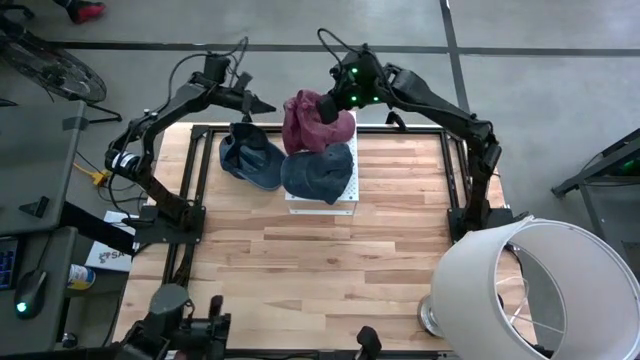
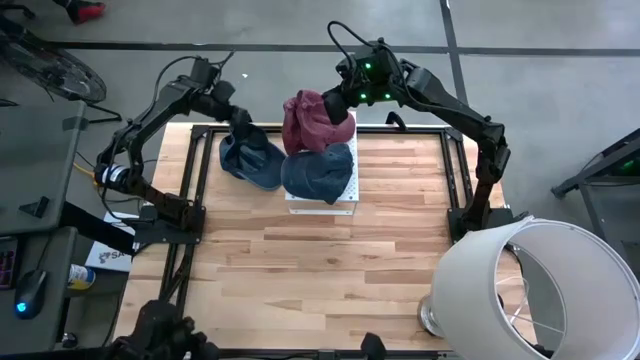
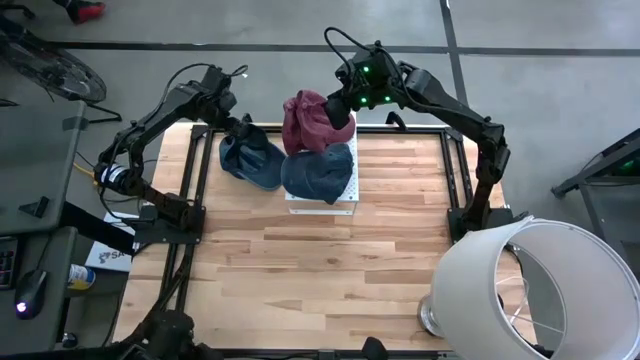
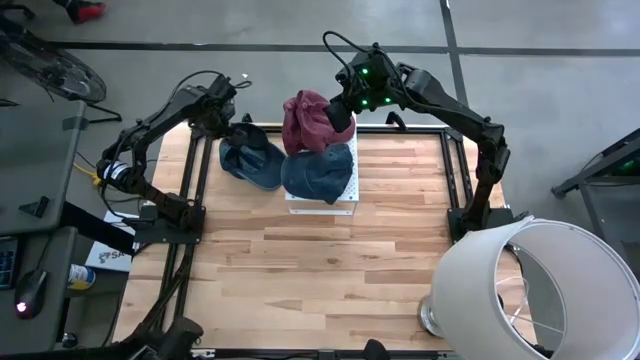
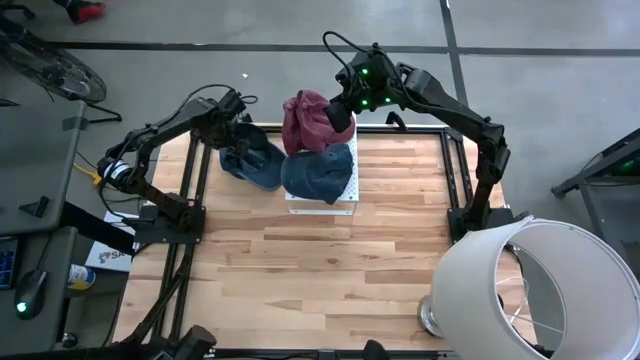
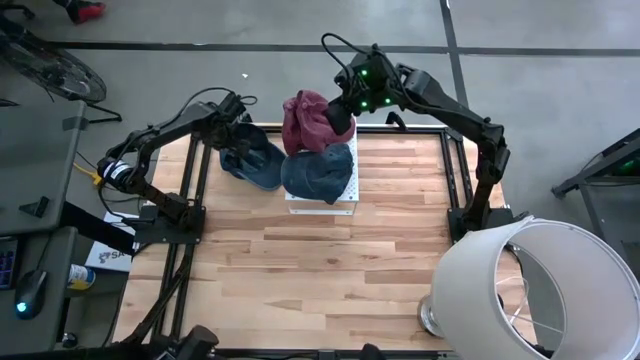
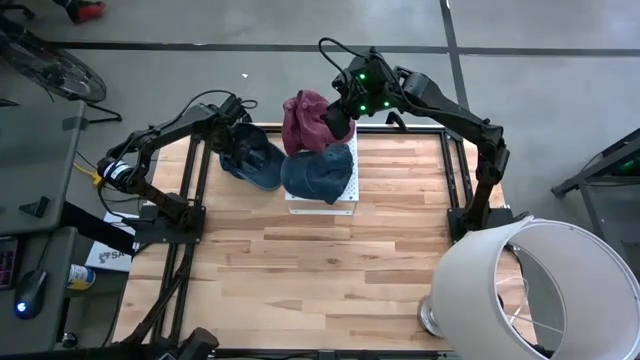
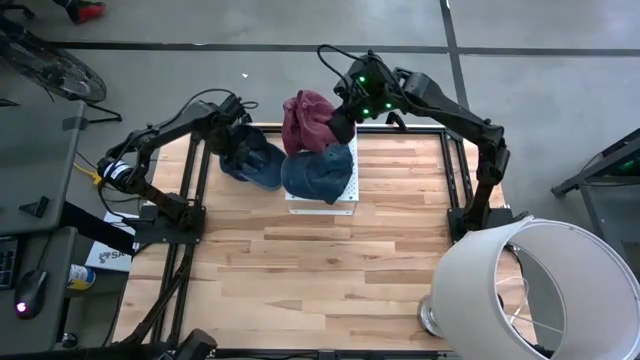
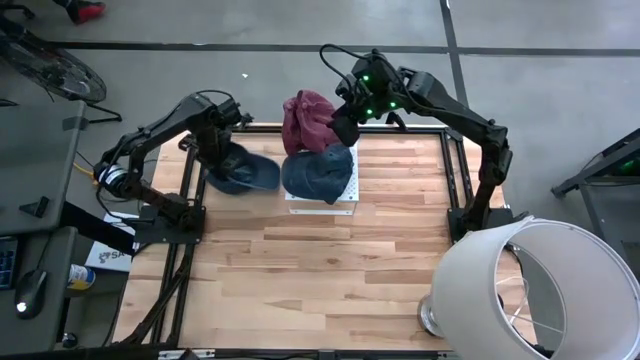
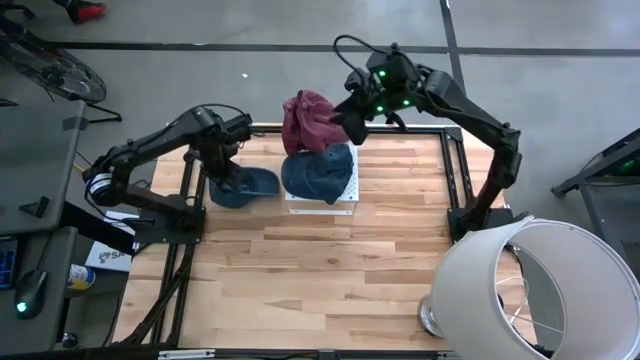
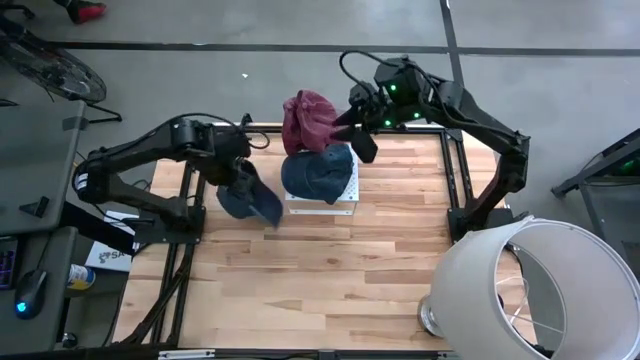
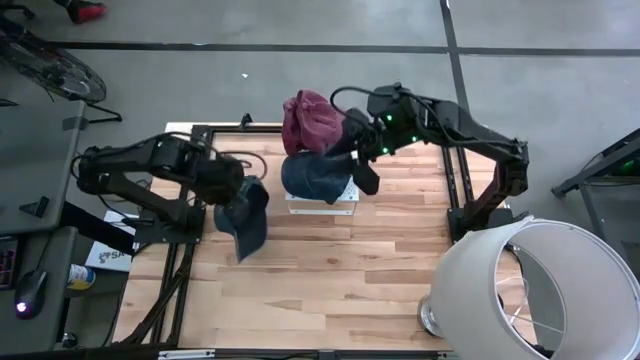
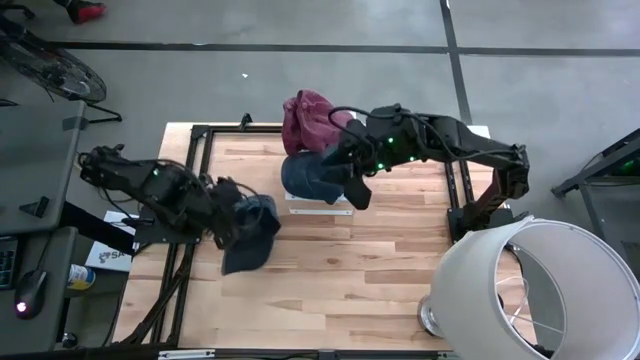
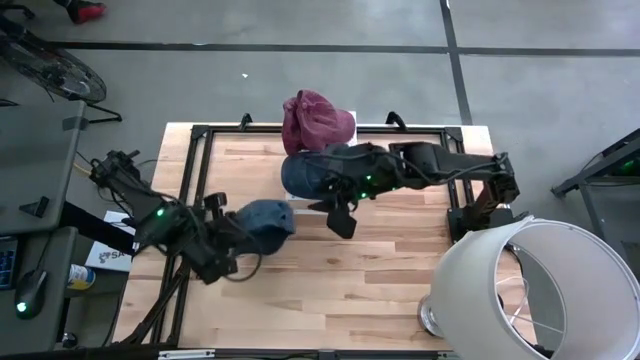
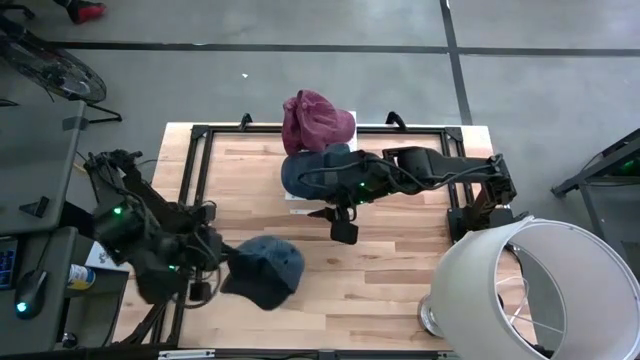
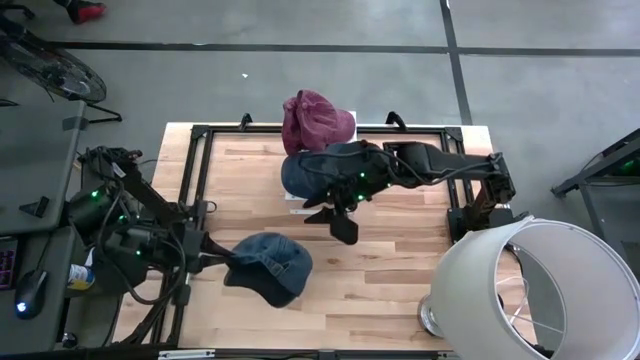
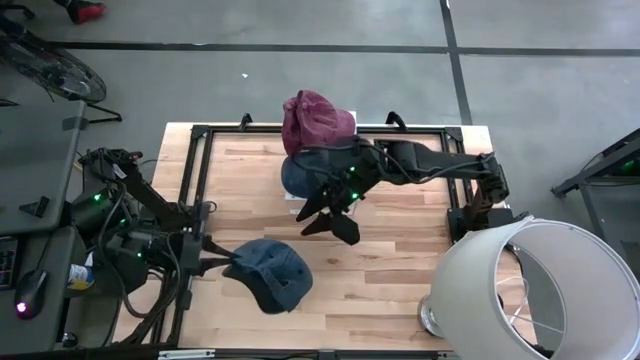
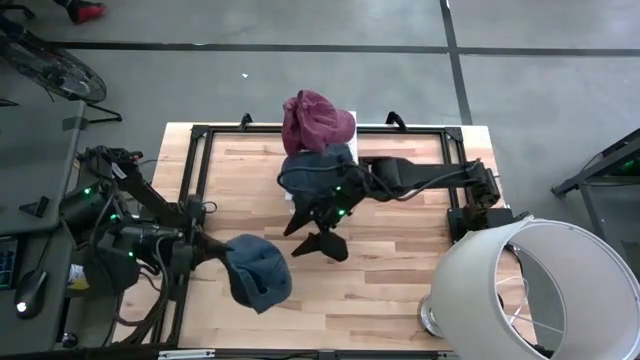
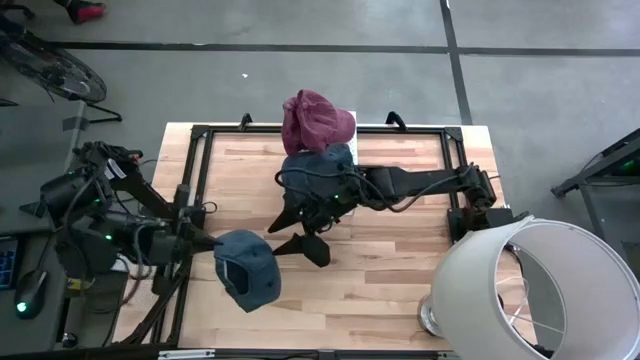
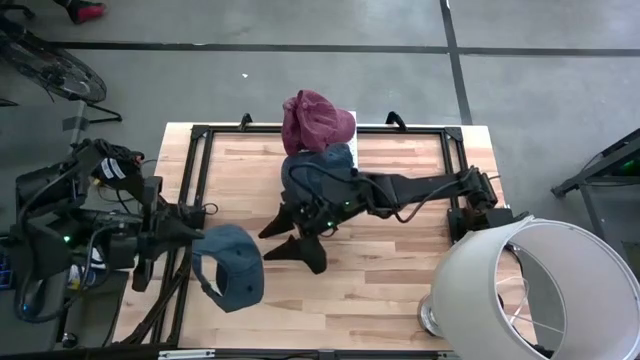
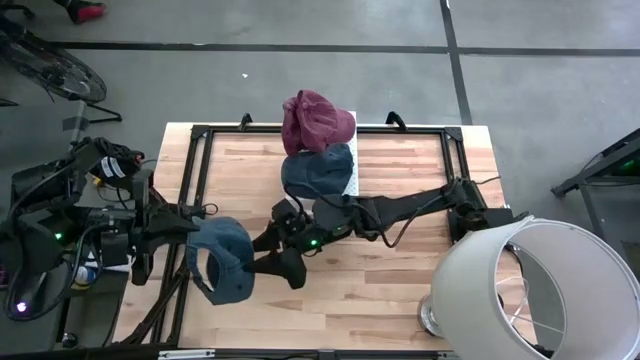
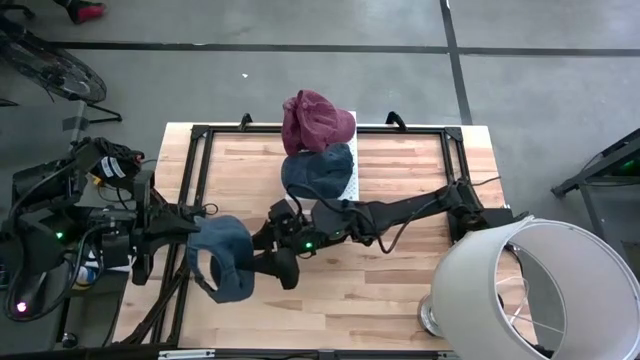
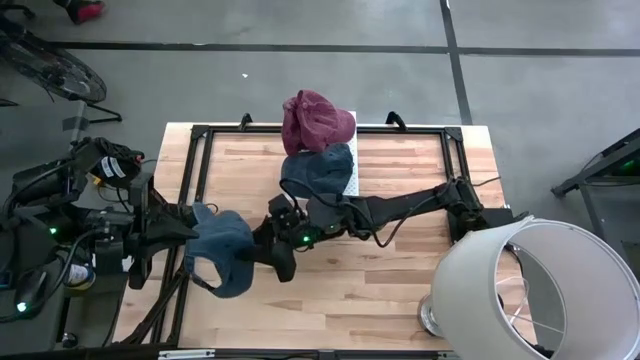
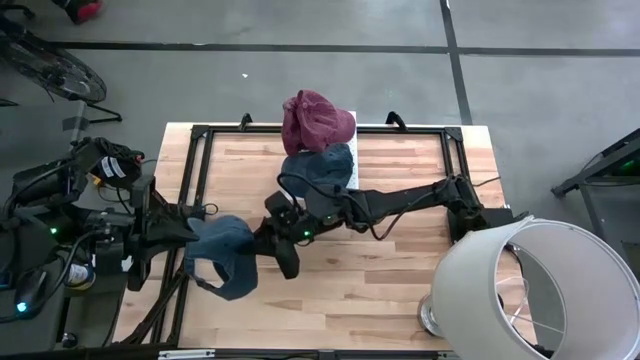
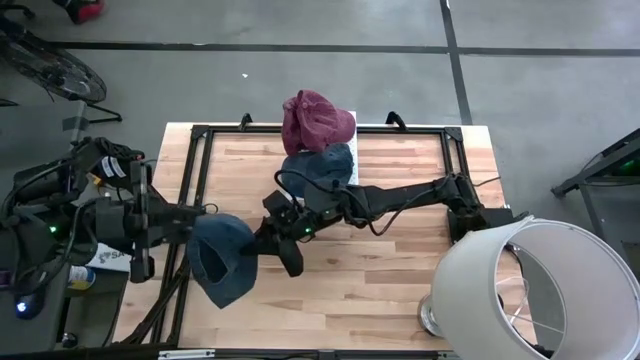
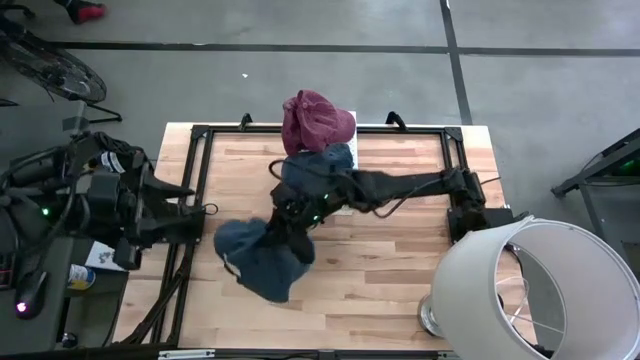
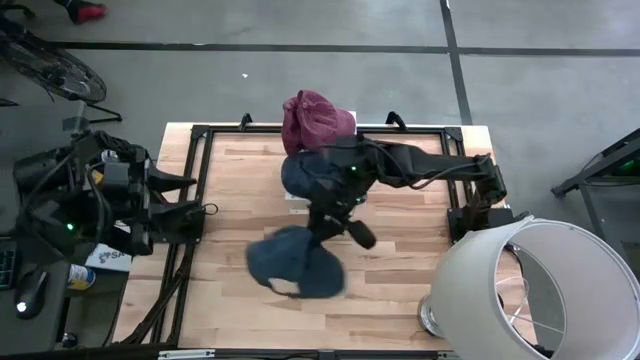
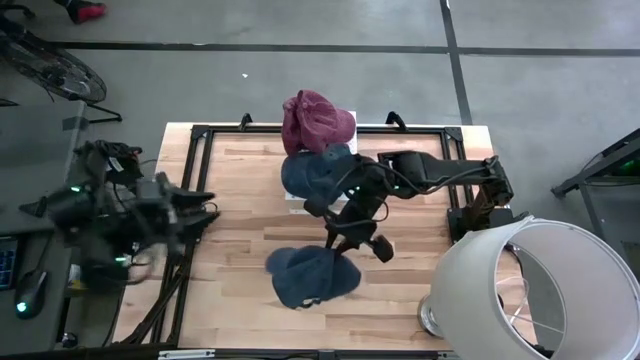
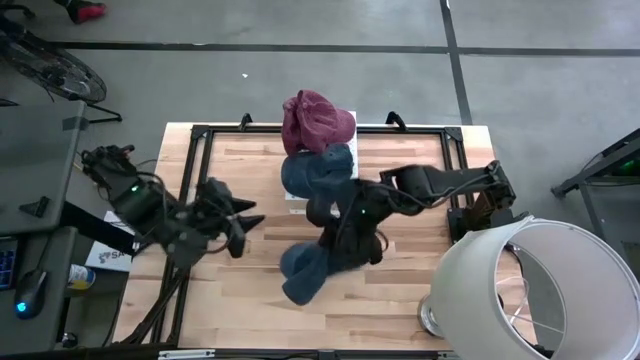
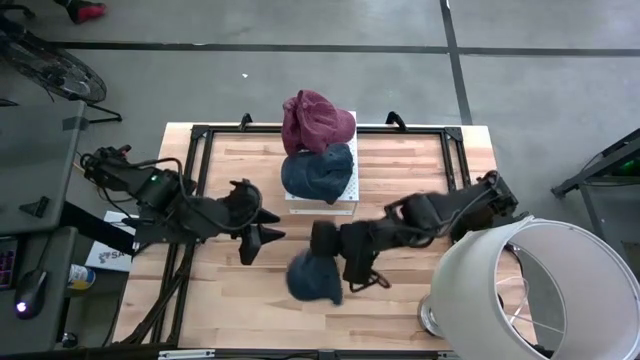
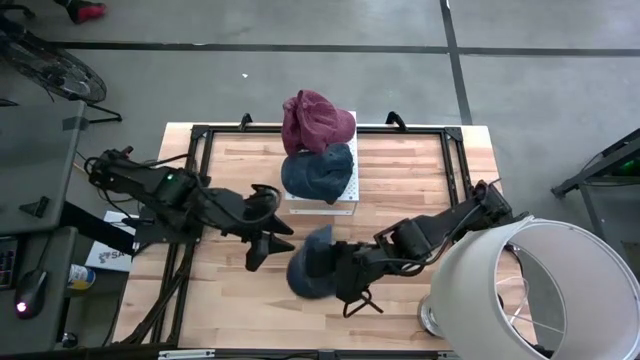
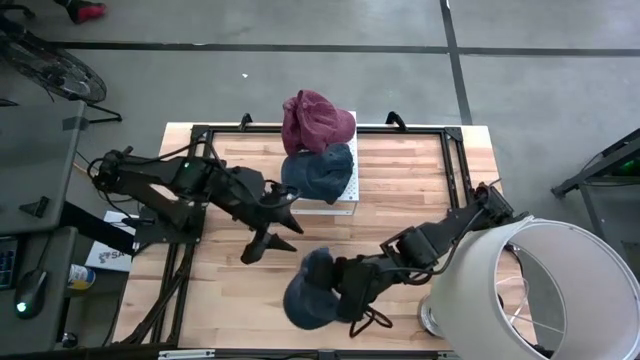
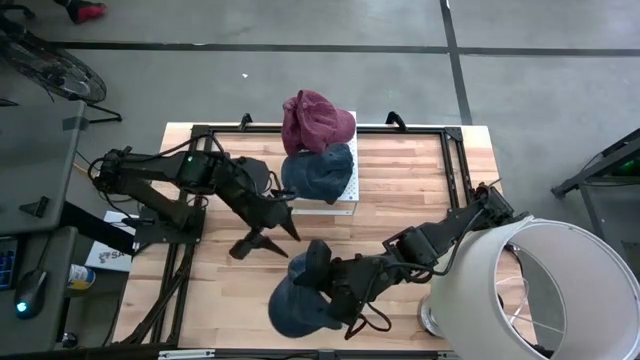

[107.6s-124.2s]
Task: Pick & Place hat
Stack the blue cap on top of the other blue cap on the shelf
